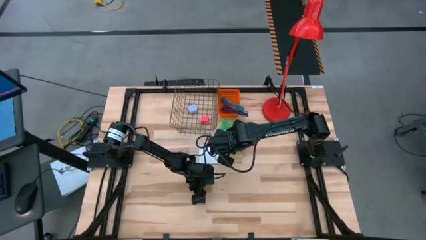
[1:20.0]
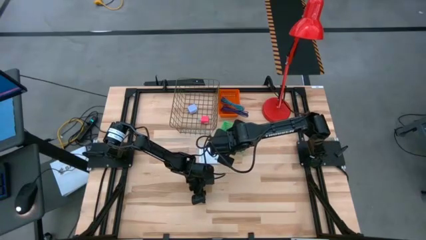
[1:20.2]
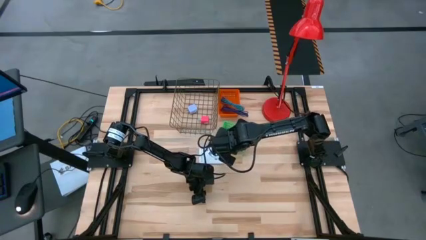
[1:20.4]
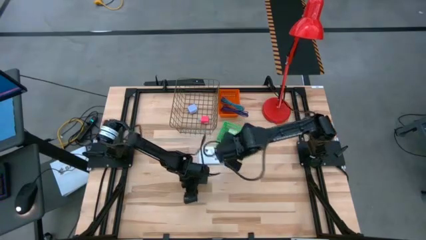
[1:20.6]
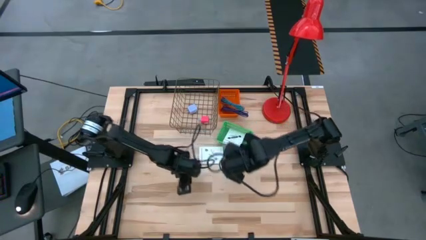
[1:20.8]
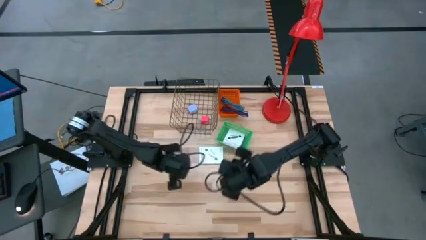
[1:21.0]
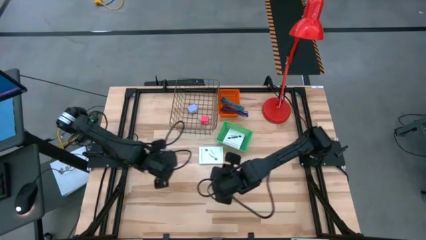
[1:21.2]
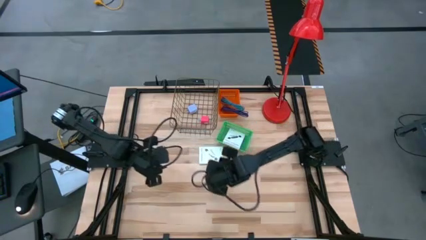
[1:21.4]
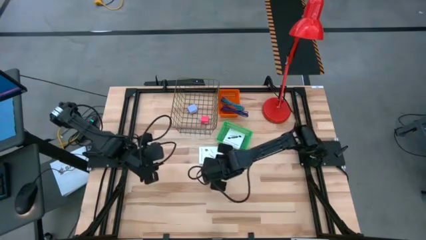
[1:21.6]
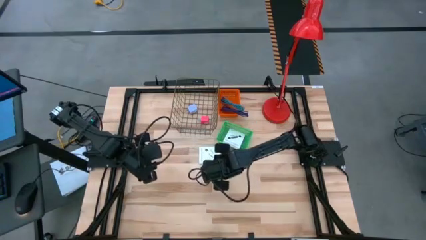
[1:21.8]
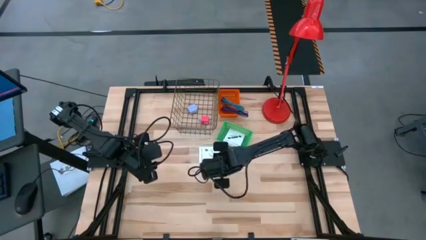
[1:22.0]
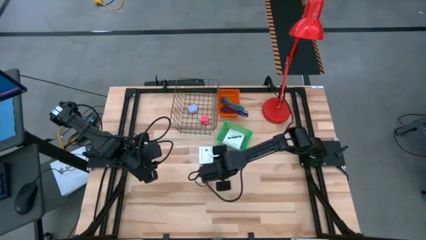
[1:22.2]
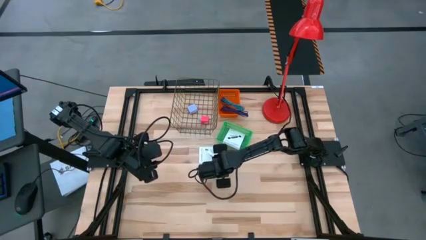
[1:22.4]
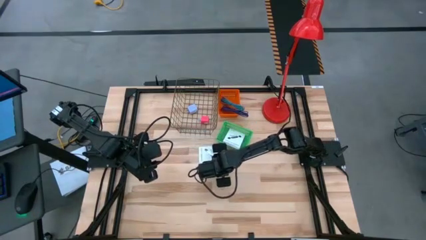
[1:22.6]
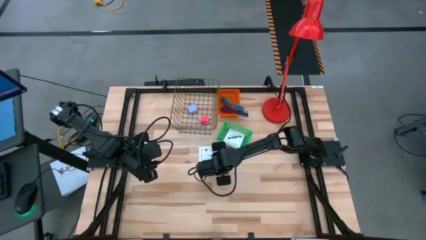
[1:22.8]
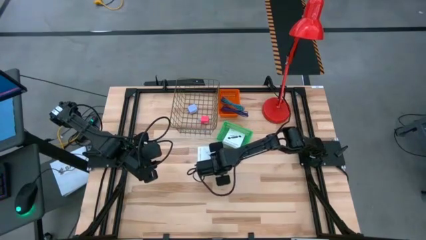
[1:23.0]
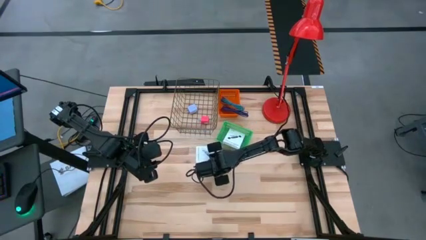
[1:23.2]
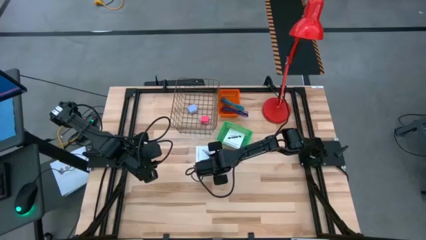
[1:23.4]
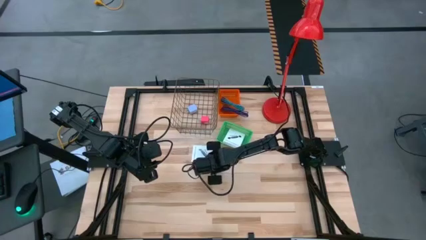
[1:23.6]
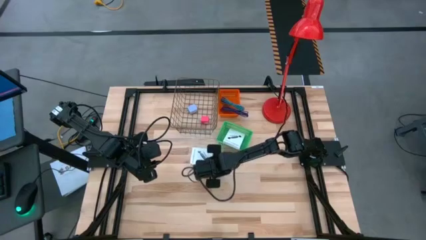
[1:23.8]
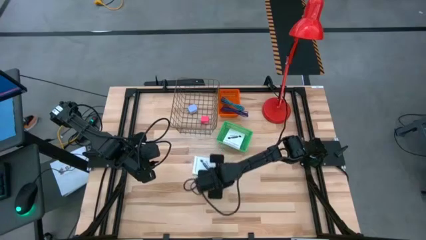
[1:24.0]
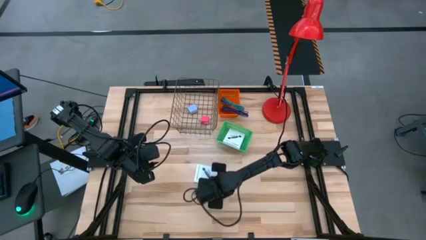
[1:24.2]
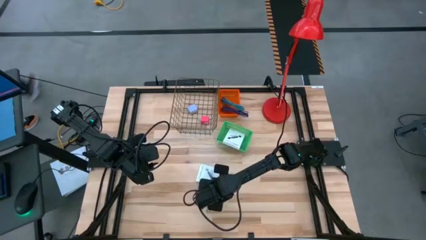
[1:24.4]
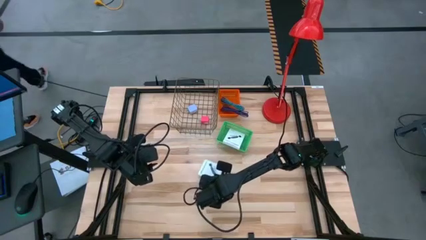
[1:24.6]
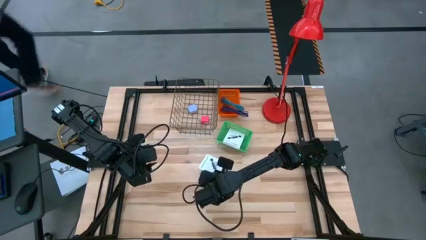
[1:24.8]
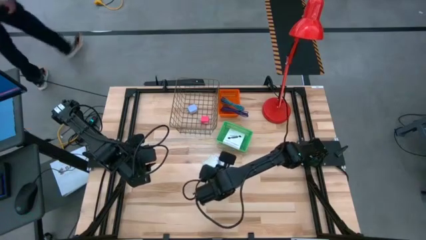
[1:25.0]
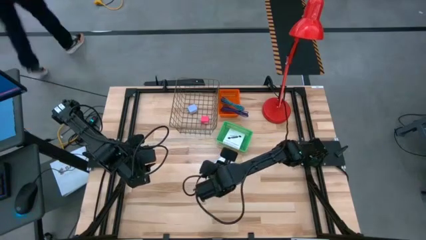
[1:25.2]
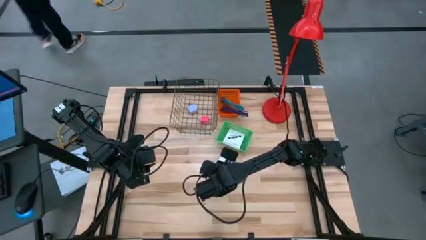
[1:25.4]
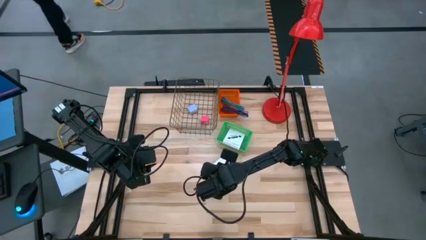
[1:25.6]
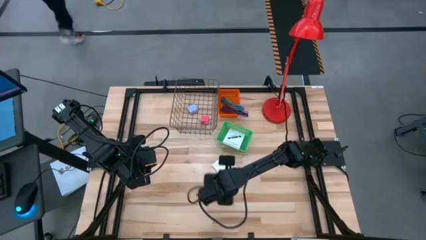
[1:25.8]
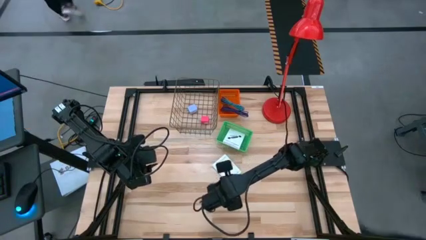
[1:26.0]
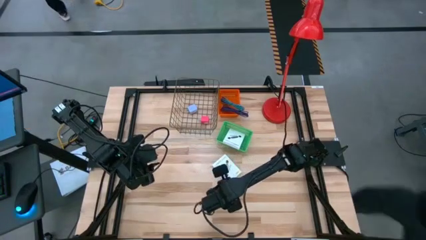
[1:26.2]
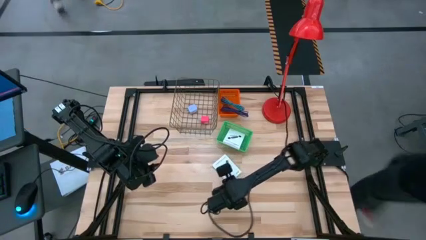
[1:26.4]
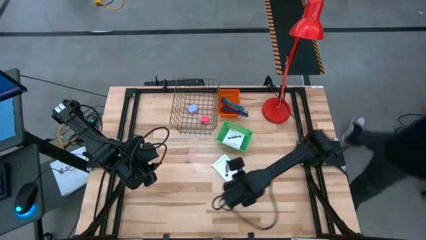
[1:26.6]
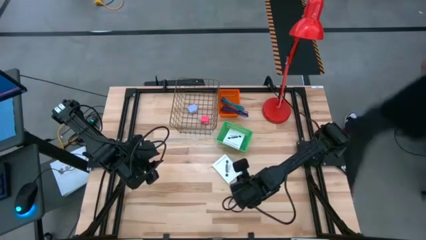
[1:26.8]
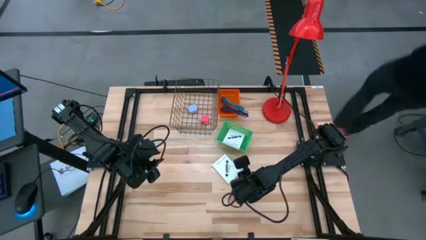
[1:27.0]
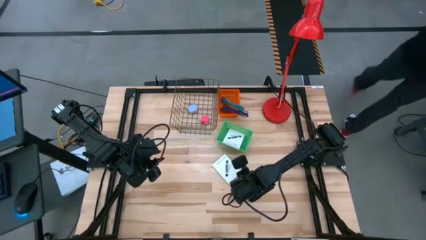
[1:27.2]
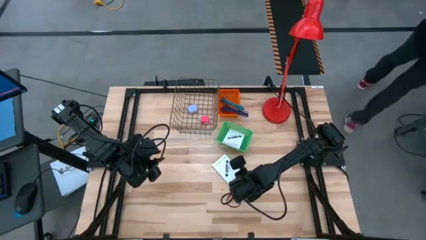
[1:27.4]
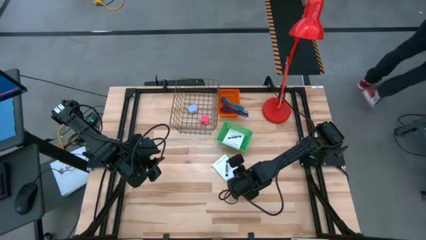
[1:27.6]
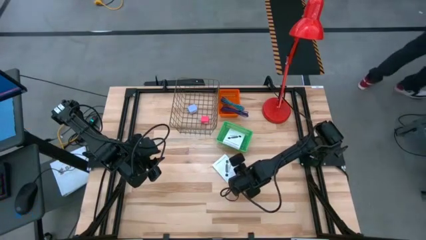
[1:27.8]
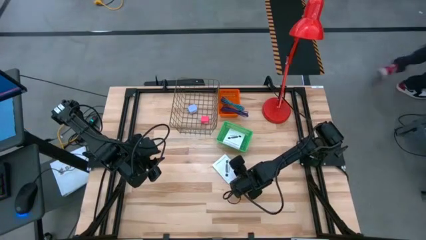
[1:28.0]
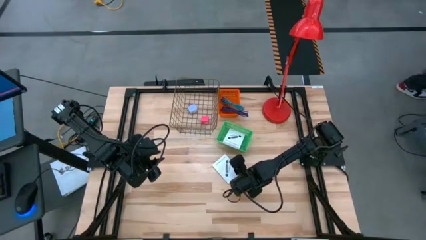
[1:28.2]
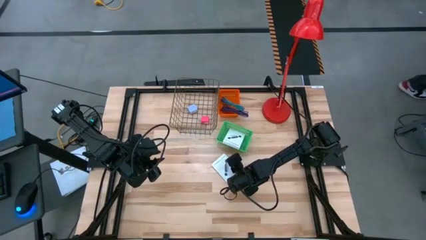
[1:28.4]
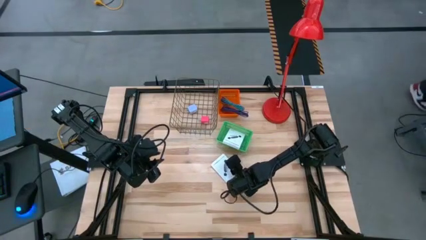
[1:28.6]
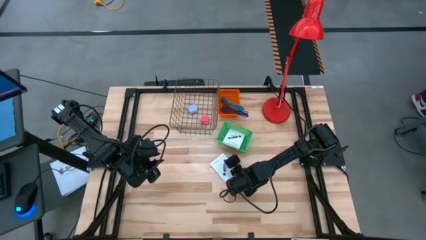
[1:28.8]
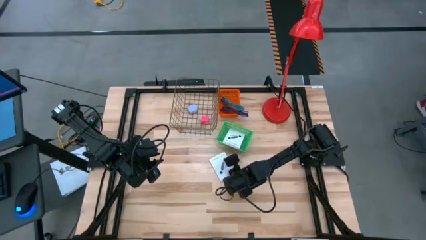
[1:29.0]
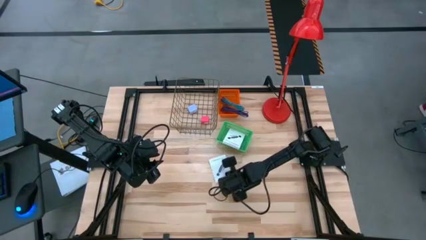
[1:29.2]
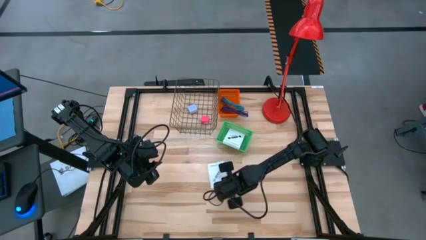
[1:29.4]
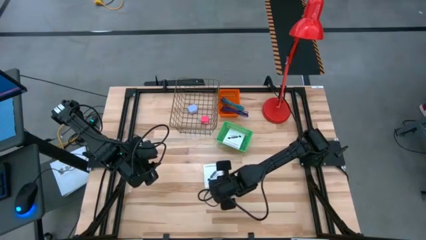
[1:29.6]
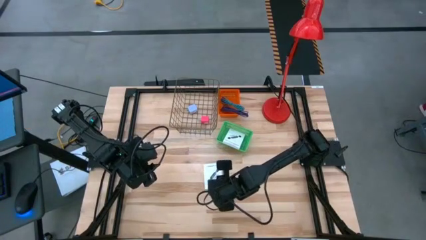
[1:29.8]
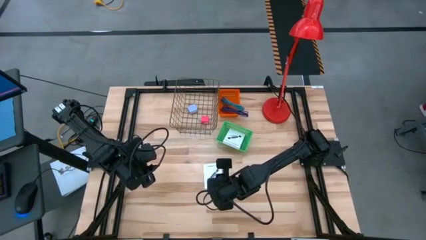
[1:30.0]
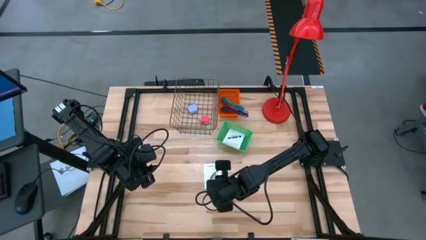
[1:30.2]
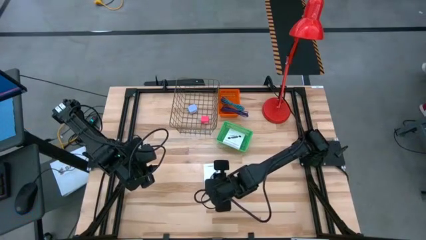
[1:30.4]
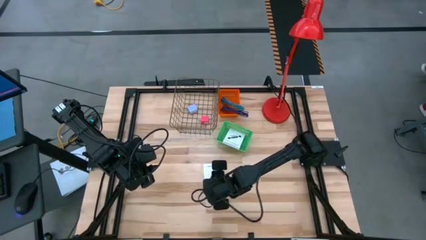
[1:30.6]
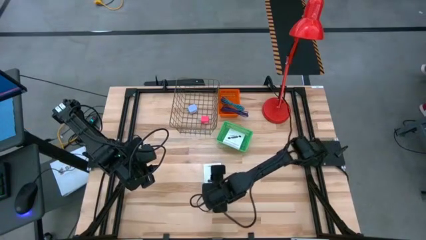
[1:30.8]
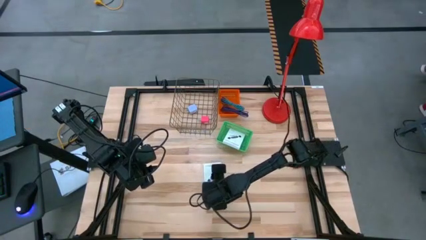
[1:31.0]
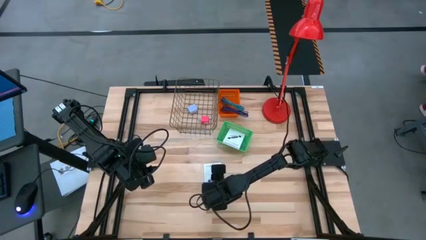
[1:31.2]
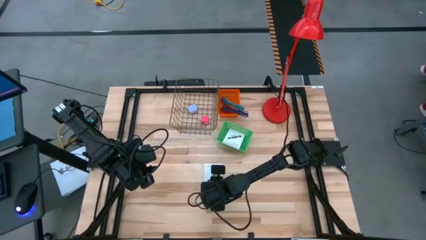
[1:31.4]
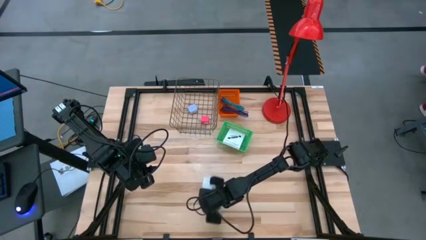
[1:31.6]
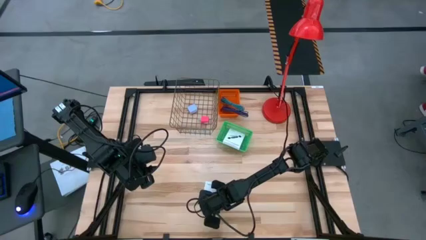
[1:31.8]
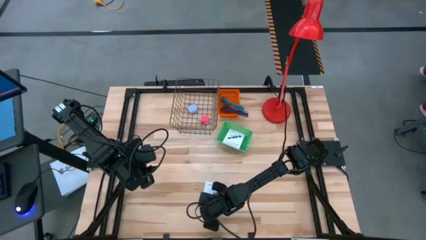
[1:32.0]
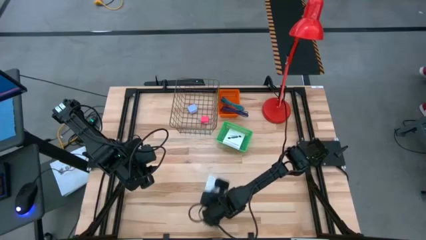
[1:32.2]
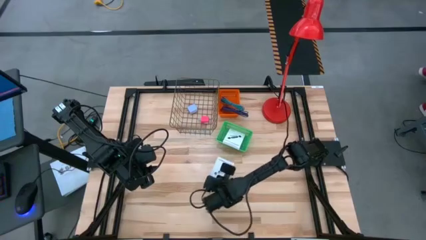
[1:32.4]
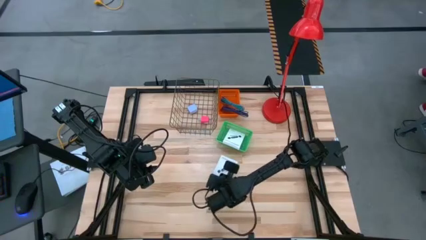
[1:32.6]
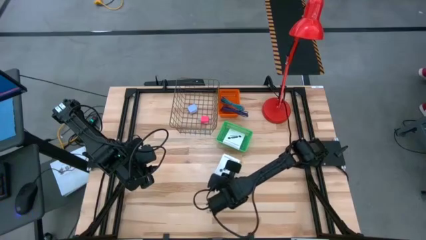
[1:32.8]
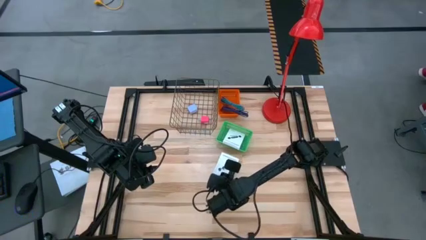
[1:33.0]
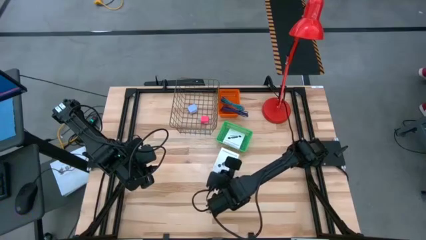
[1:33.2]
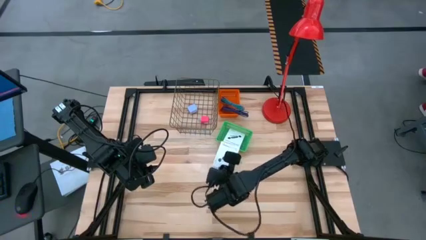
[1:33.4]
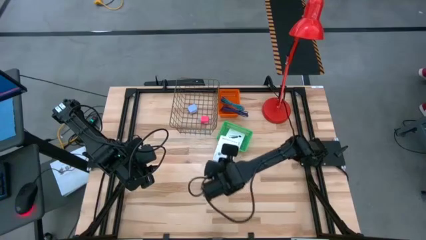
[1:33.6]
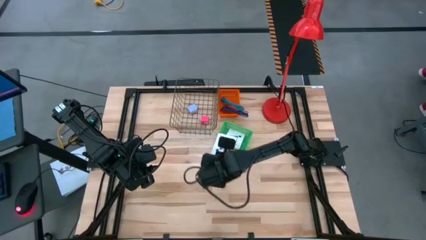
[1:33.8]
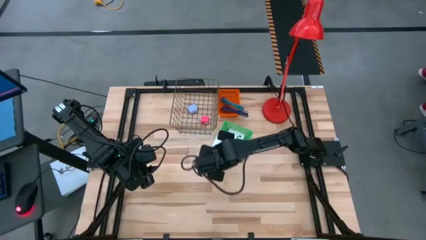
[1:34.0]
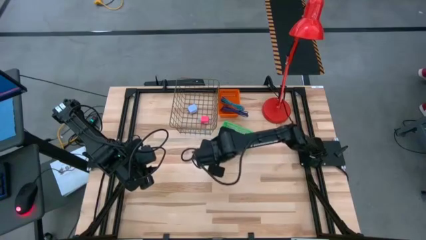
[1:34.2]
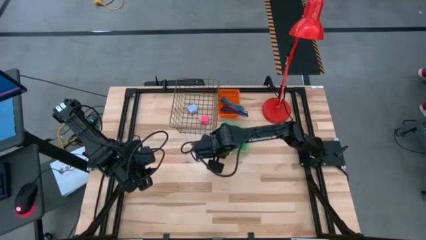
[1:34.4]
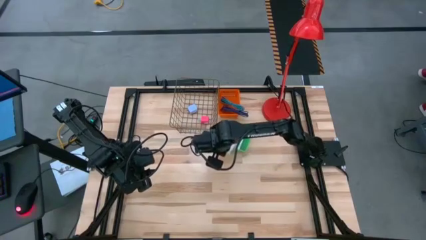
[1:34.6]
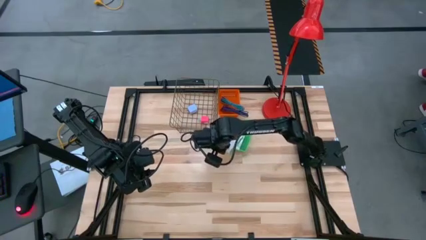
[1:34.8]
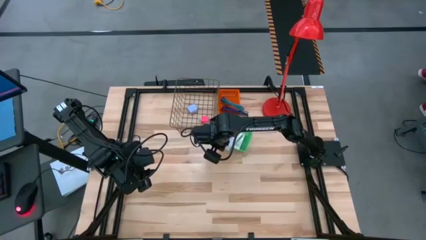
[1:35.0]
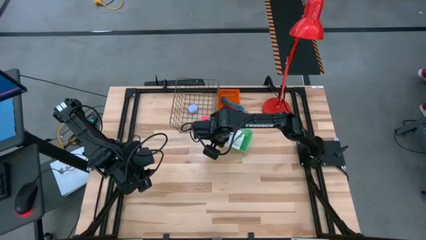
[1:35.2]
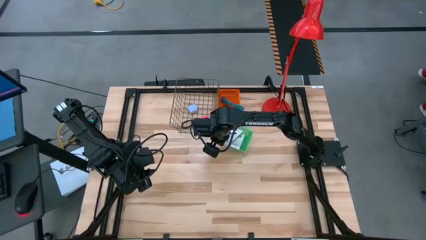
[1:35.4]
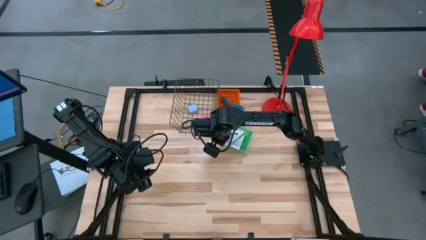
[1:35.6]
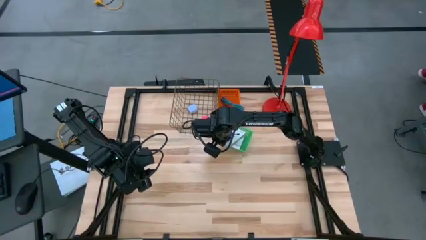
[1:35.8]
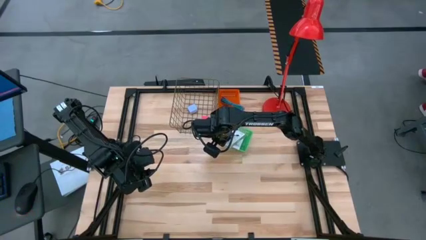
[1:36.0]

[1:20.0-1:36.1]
Task: Pick and place items into bin
Put the card reader box into the green basket
